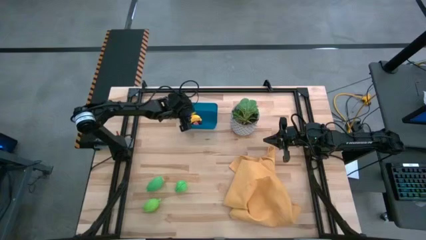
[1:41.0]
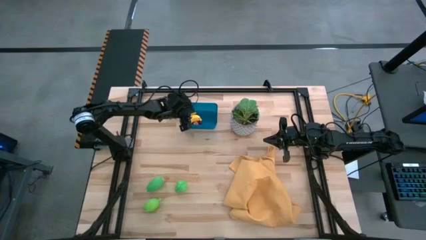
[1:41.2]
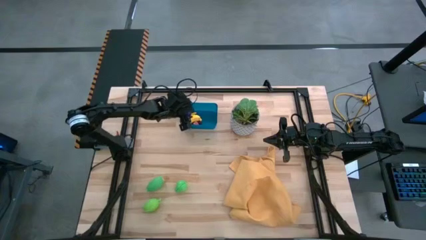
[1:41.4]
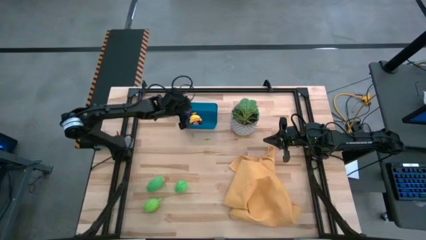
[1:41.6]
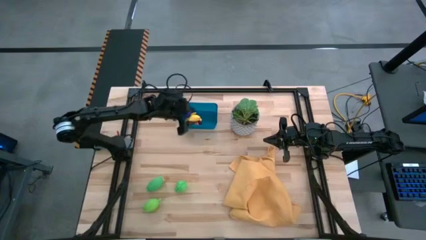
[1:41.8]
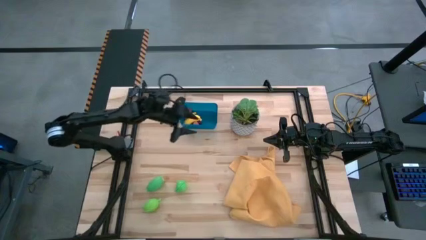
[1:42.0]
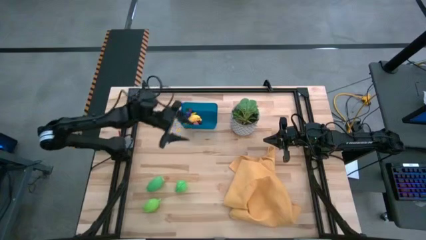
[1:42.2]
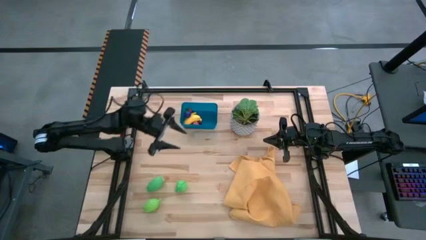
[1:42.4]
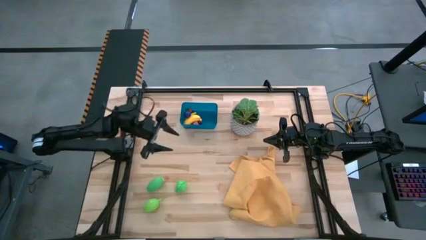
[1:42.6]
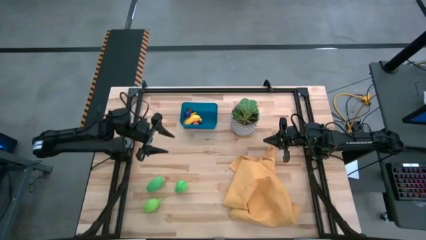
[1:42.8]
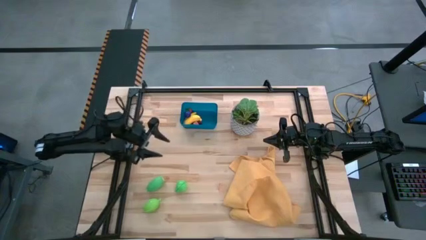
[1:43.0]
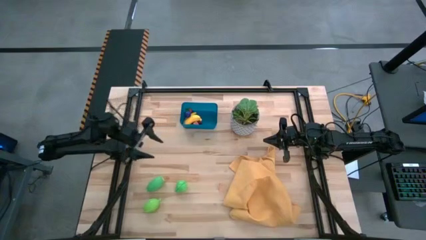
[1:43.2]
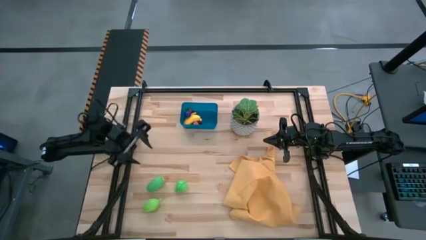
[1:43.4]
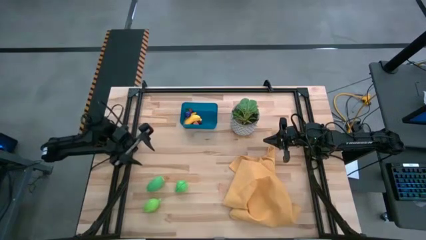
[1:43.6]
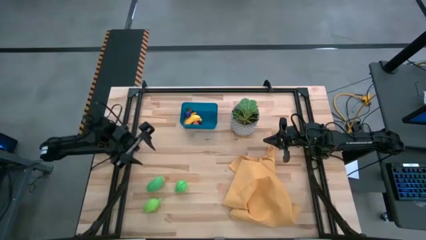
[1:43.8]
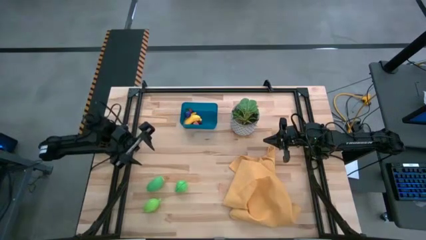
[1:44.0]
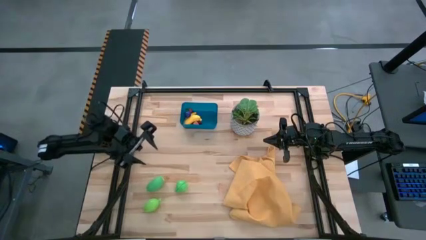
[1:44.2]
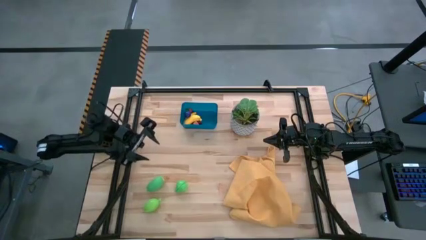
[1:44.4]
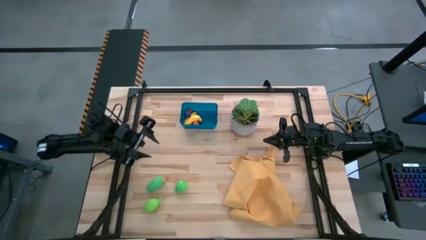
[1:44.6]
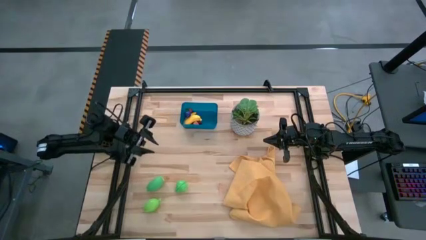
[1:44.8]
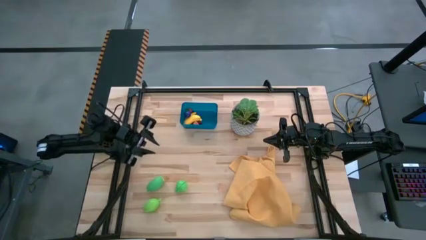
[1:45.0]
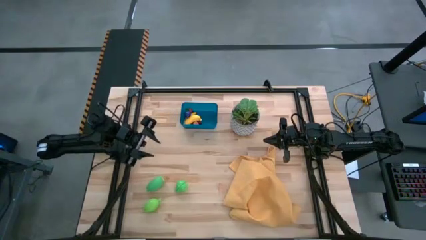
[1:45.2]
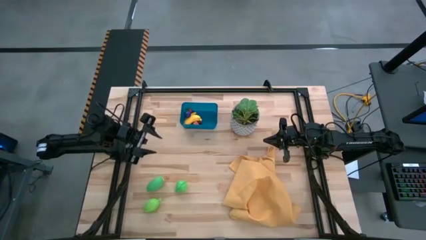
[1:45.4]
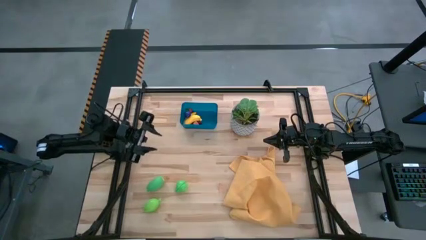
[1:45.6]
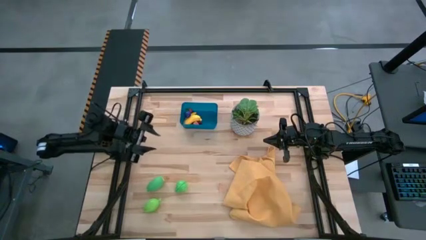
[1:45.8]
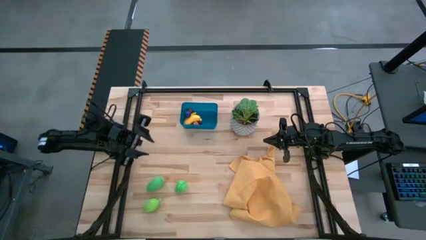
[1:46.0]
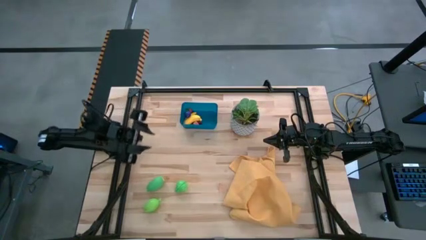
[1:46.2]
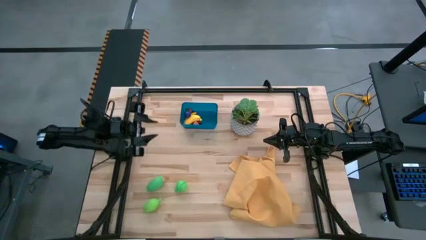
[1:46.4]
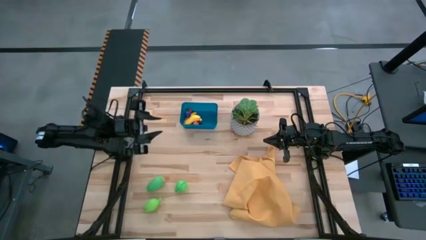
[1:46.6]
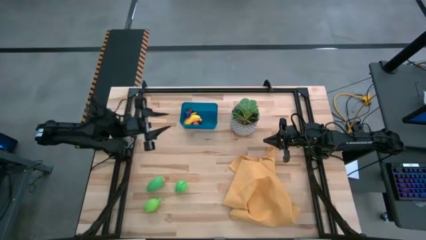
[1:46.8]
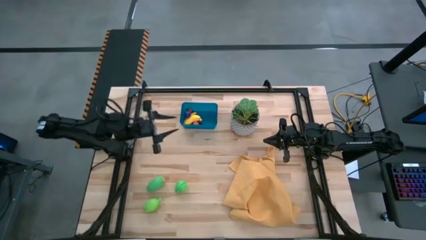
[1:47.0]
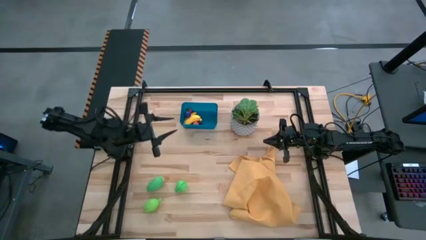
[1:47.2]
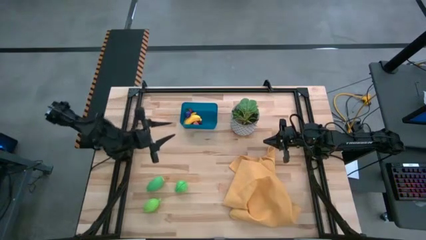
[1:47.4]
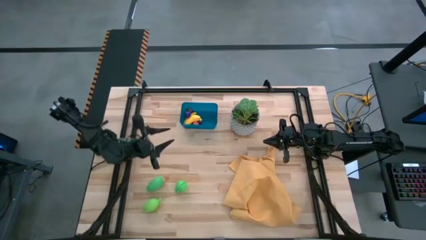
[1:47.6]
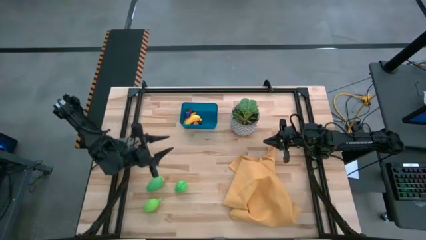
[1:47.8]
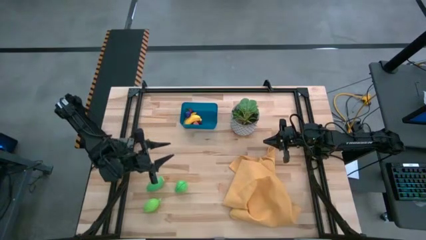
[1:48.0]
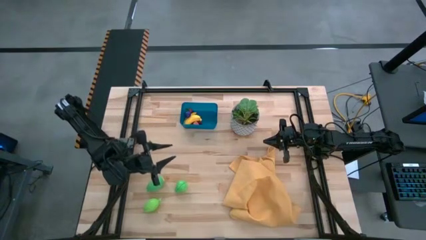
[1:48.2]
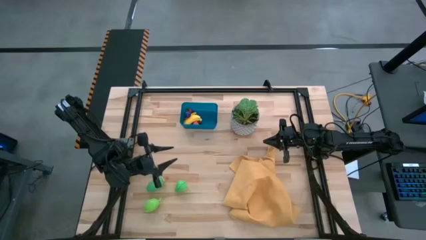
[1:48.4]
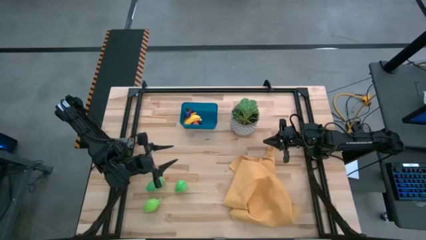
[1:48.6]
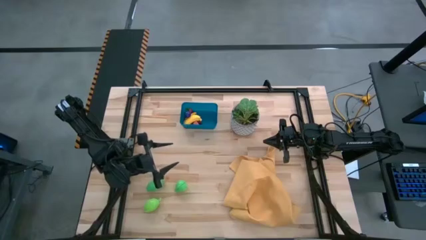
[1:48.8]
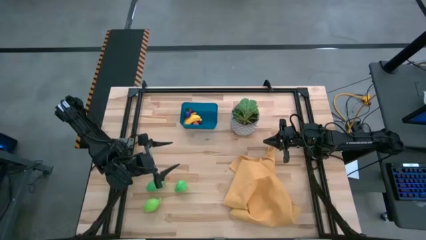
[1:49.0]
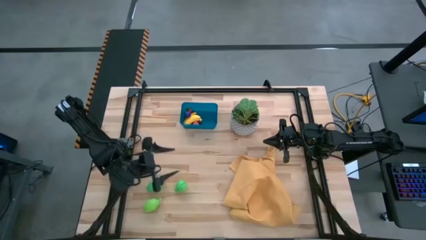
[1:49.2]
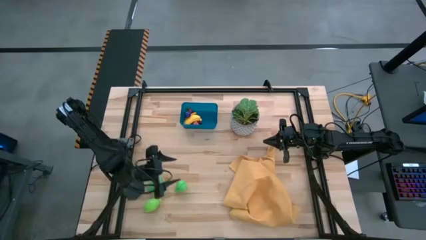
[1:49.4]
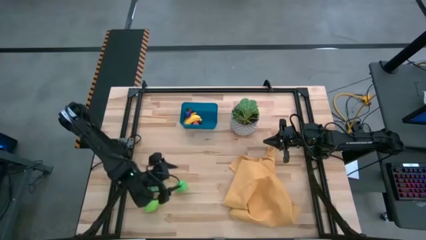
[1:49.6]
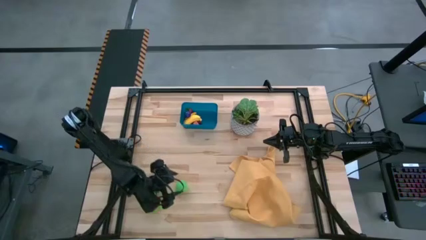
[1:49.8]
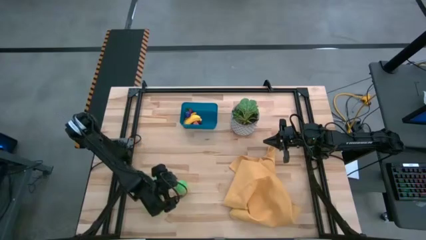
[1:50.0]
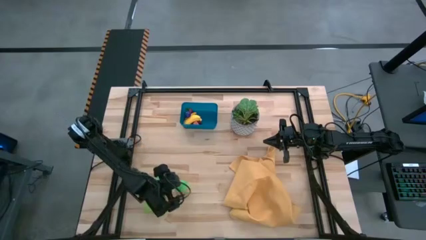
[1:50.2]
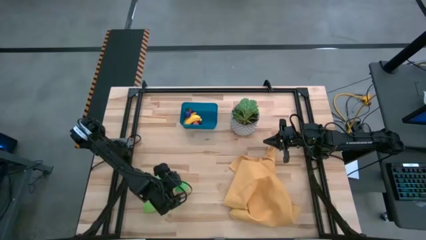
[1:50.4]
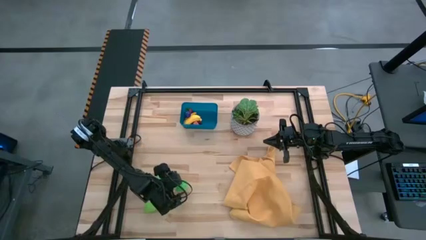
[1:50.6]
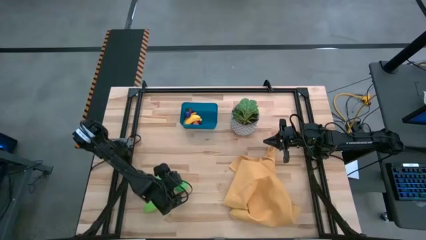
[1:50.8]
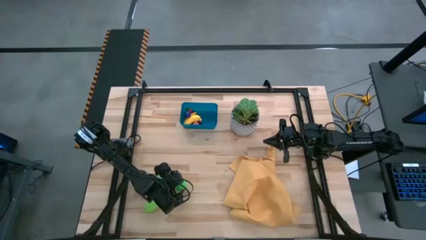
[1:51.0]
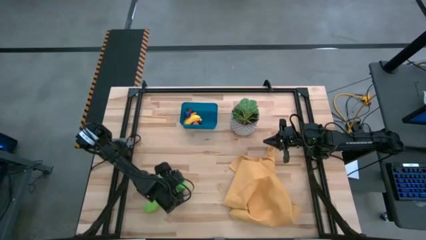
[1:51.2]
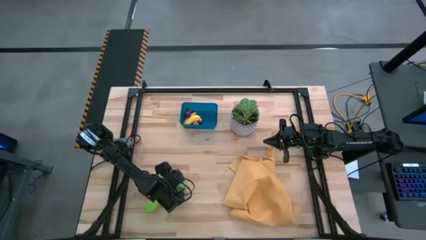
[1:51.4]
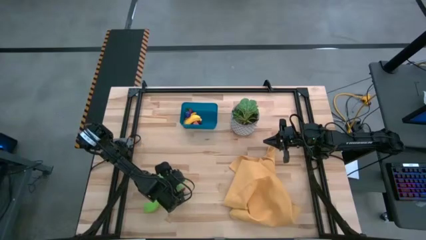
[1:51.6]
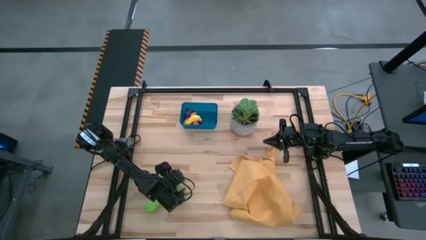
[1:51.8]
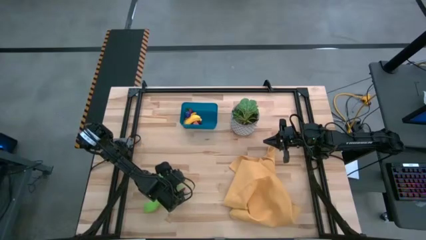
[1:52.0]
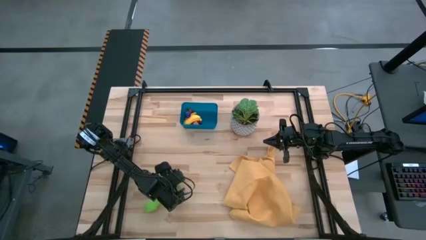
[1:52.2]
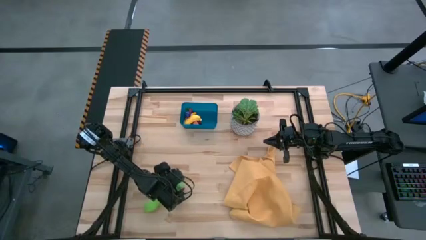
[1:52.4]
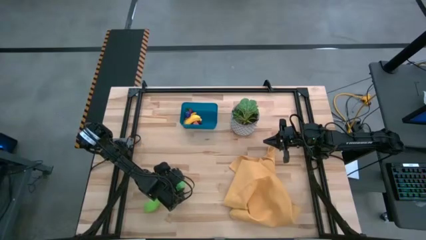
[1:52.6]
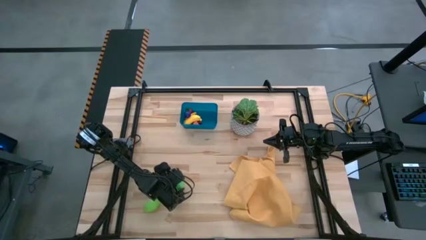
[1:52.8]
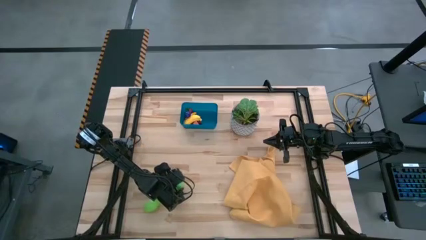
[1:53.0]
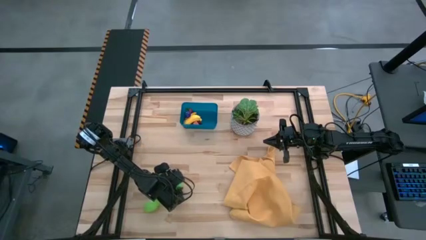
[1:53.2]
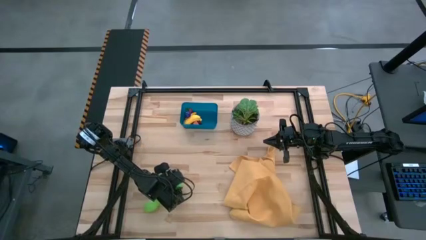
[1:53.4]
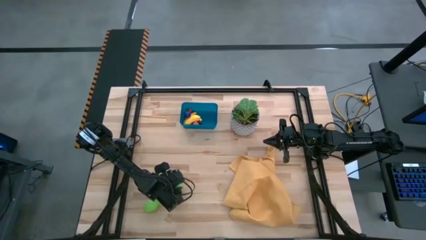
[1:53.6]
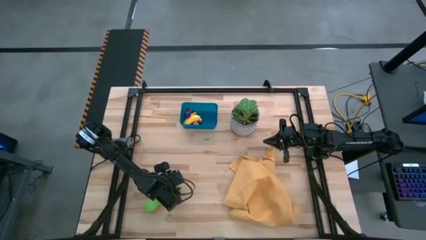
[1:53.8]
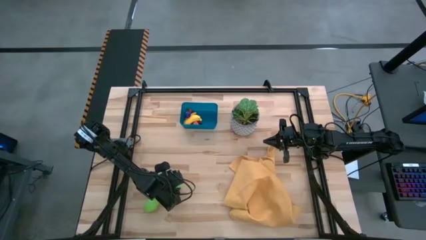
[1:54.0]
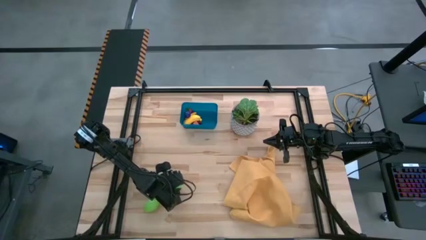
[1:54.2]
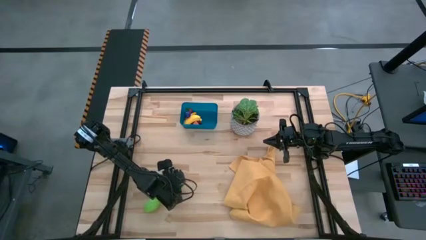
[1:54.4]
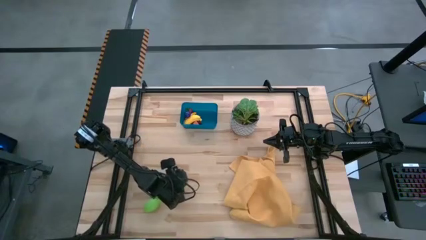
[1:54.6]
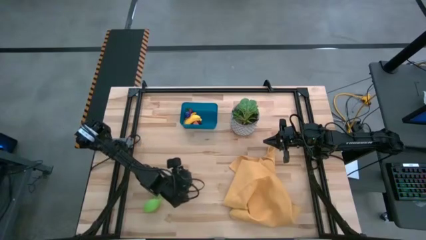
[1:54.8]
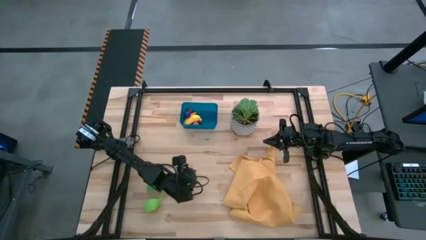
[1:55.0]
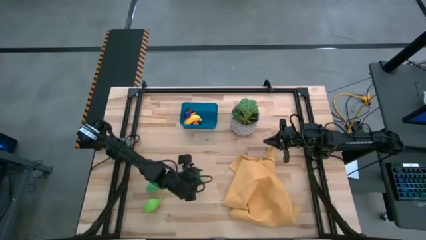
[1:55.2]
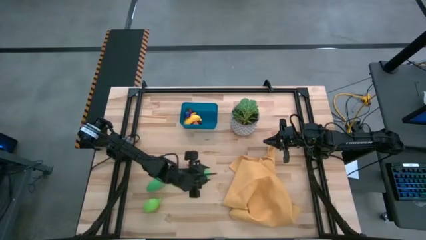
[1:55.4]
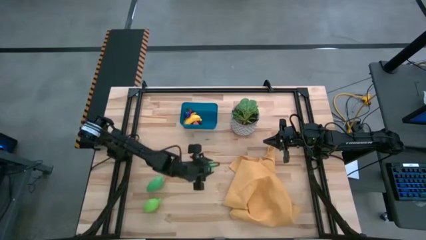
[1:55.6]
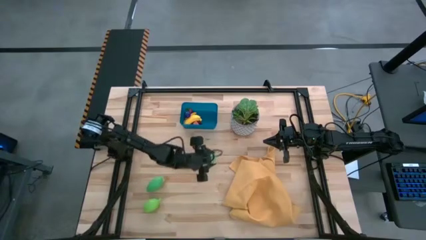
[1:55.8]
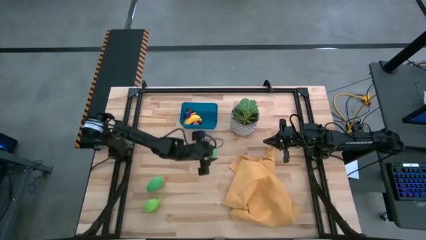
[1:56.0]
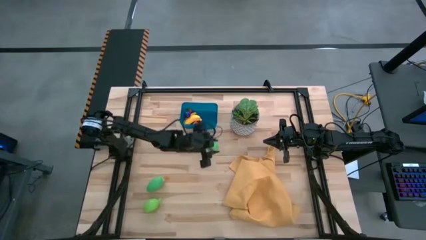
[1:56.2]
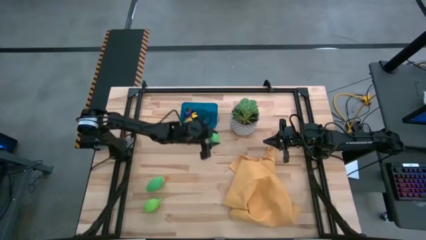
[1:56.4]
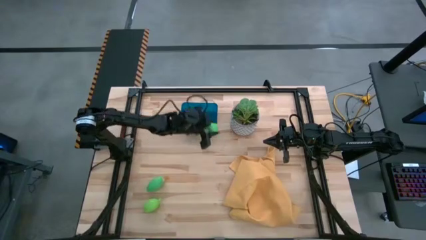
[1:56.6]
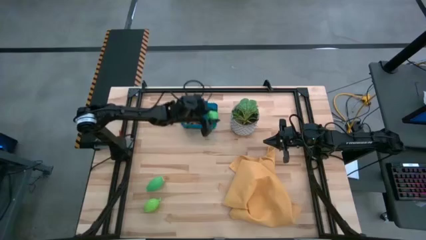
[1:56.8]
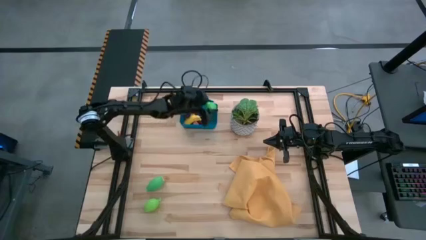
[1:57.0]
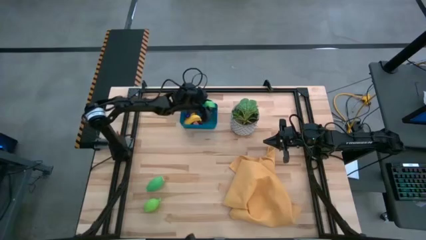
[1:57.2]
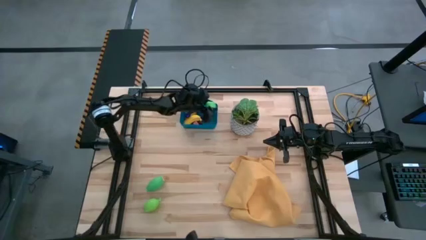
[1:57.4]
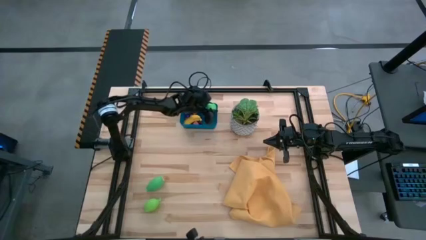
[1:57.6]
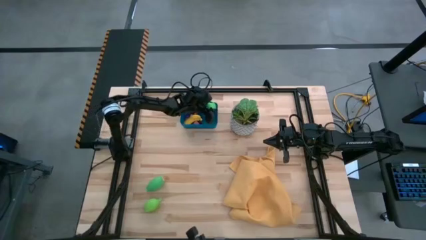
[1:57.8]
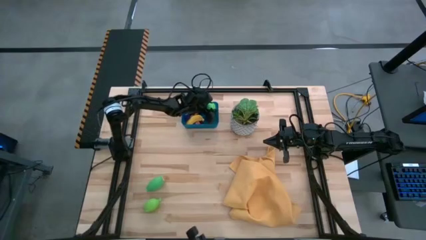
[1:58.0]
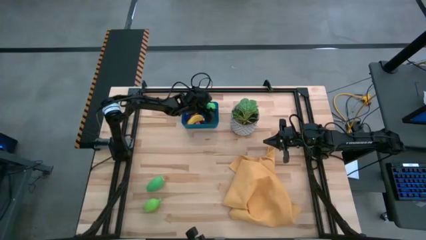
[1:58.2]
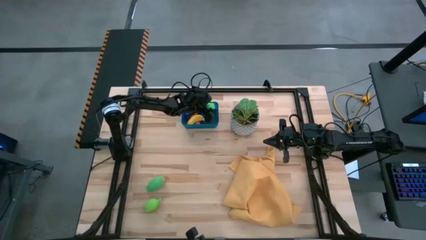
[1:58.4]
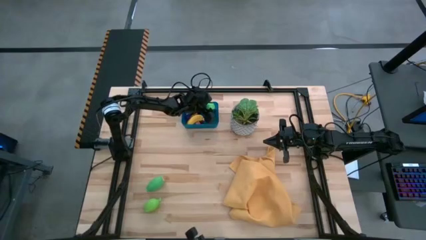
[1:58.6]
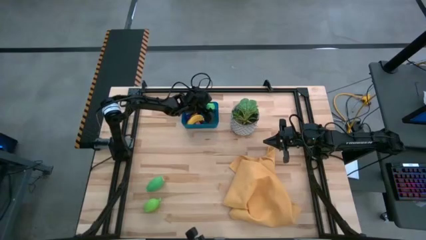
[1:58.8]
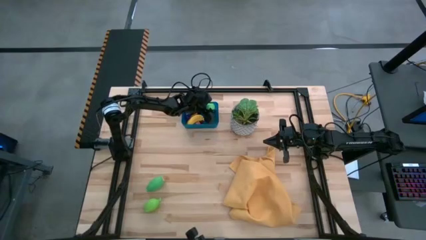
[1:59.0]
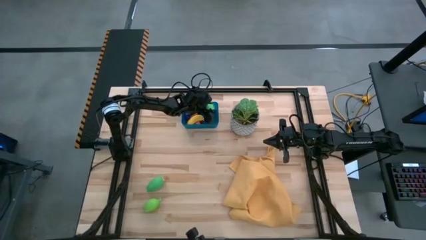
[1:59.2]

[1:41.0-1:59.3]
Task: Pick and placing Produce into tupperware
Put the green pear into the blue bin
